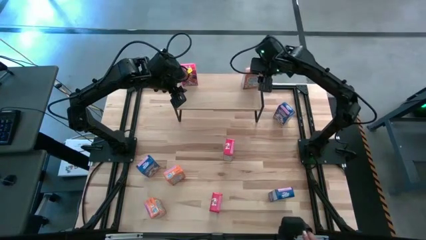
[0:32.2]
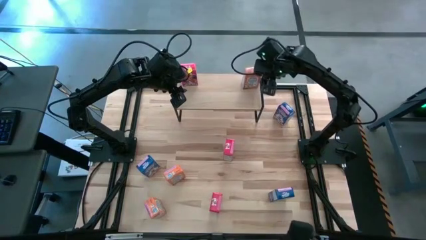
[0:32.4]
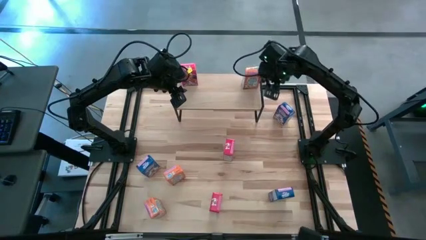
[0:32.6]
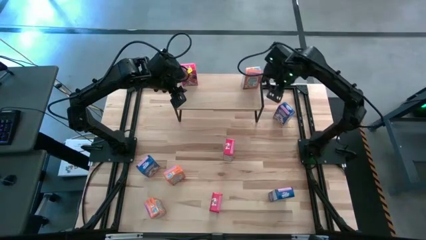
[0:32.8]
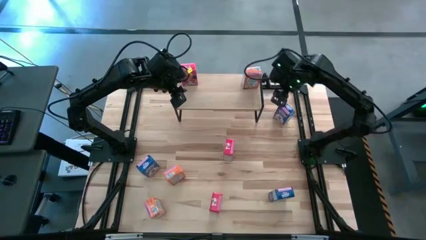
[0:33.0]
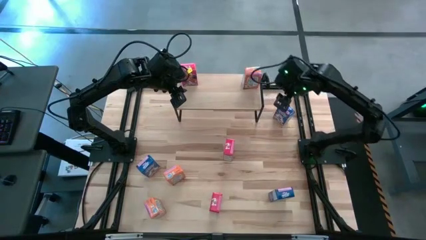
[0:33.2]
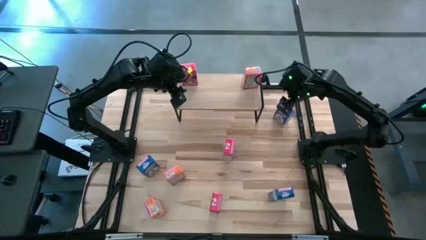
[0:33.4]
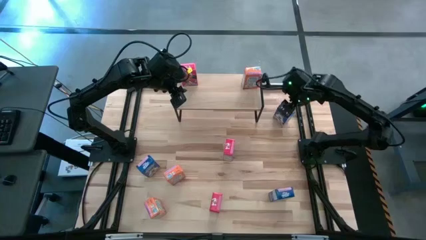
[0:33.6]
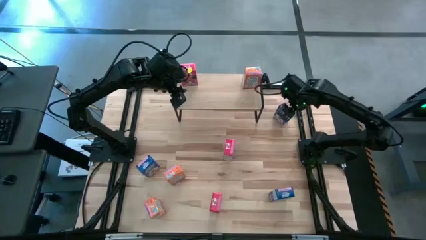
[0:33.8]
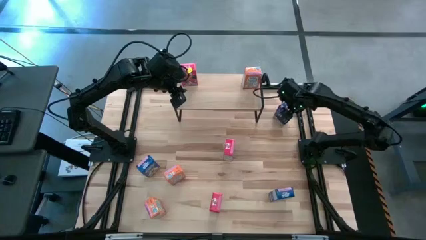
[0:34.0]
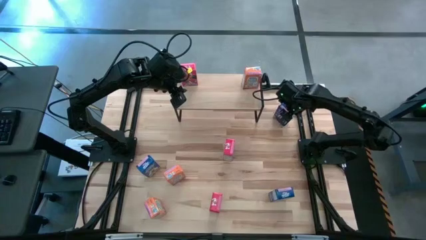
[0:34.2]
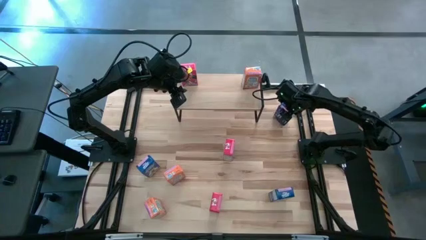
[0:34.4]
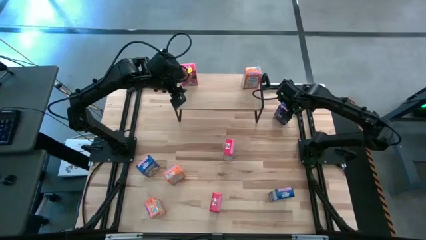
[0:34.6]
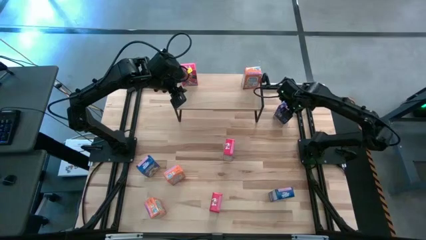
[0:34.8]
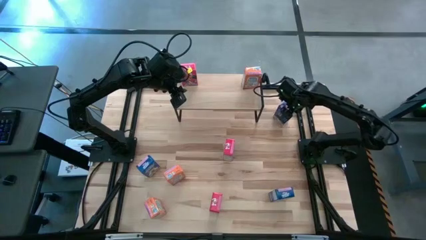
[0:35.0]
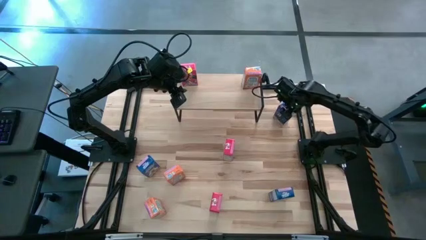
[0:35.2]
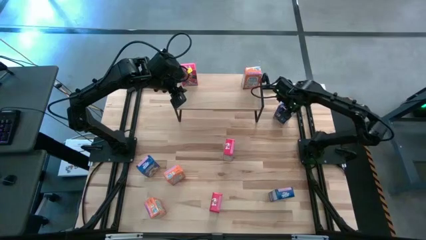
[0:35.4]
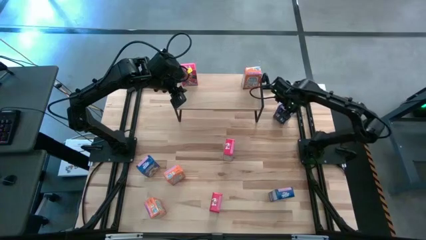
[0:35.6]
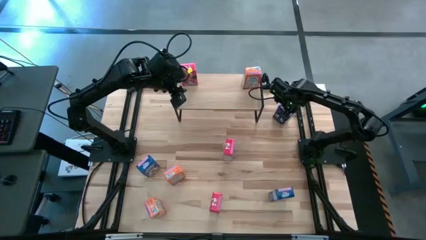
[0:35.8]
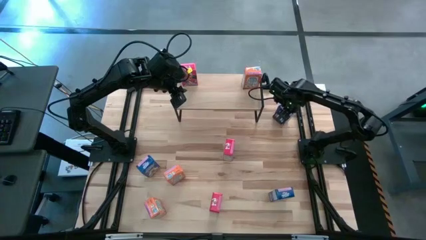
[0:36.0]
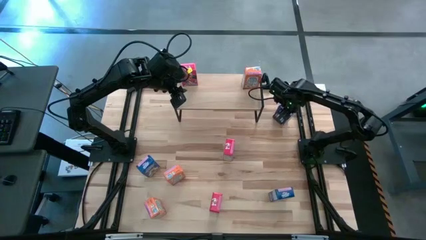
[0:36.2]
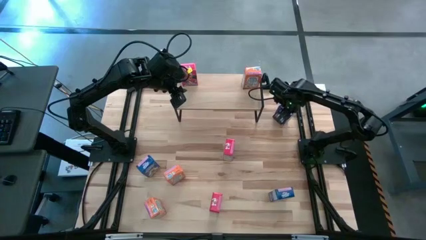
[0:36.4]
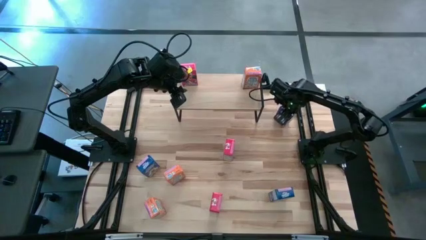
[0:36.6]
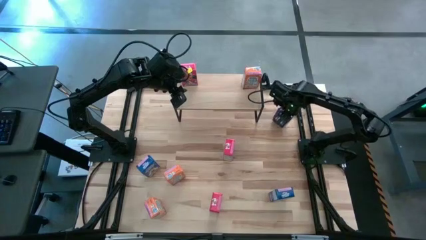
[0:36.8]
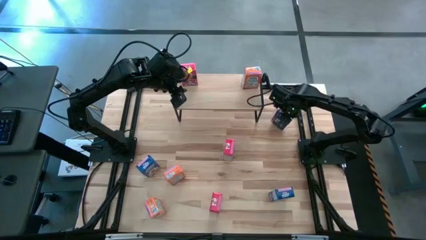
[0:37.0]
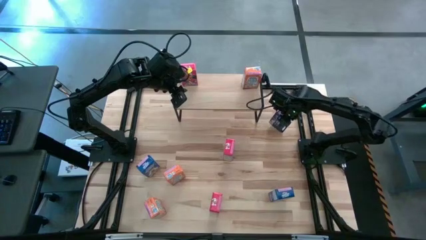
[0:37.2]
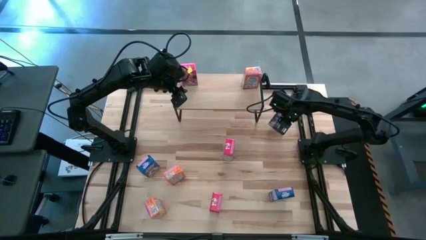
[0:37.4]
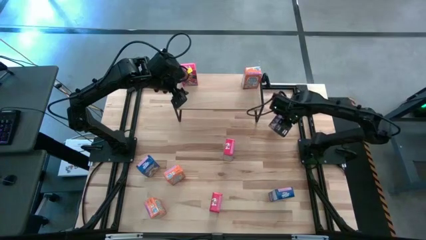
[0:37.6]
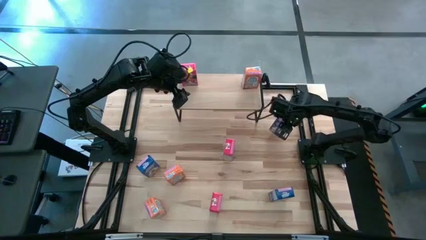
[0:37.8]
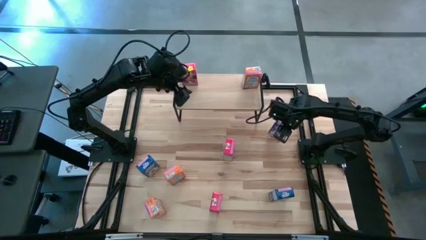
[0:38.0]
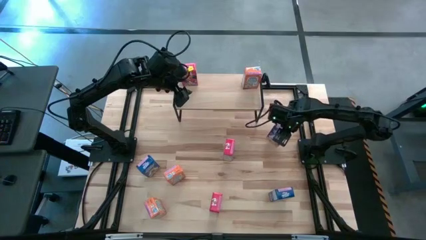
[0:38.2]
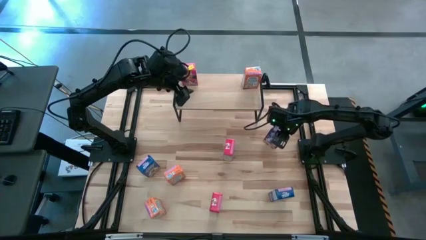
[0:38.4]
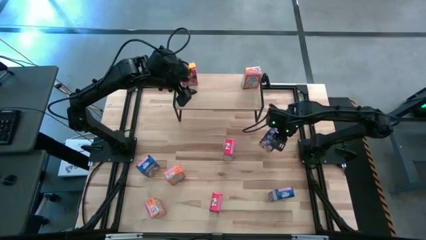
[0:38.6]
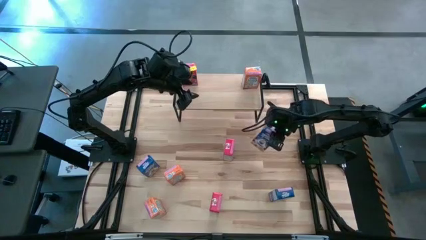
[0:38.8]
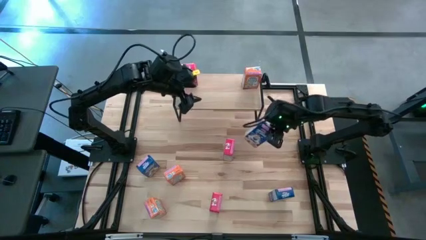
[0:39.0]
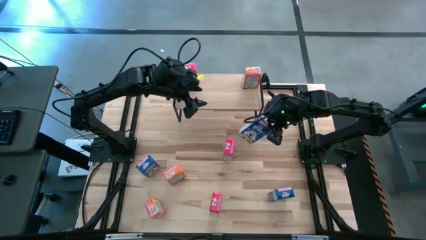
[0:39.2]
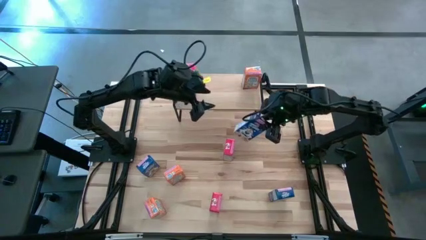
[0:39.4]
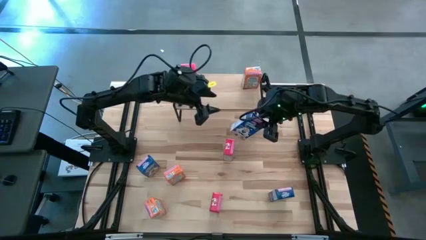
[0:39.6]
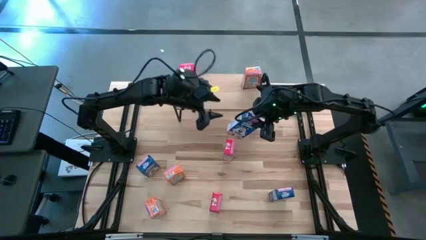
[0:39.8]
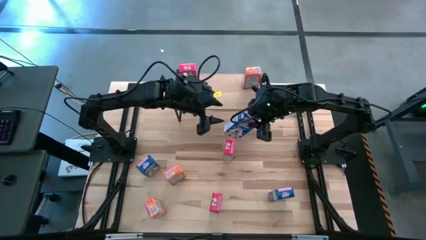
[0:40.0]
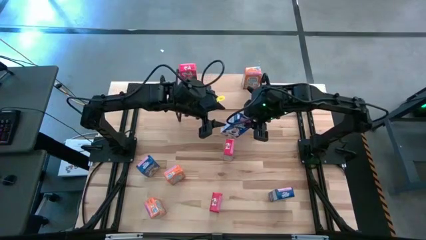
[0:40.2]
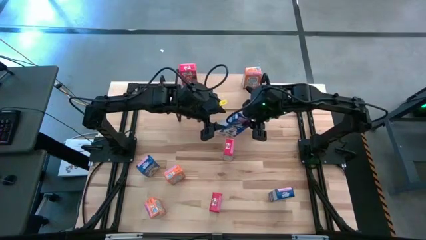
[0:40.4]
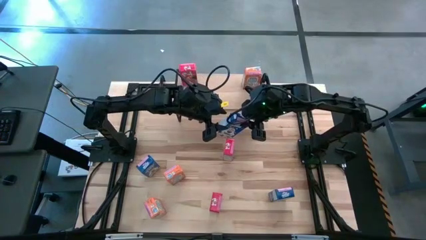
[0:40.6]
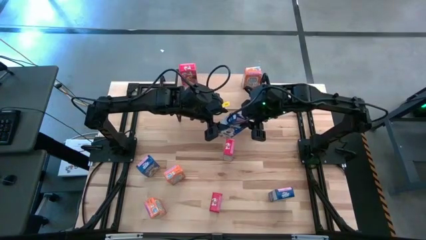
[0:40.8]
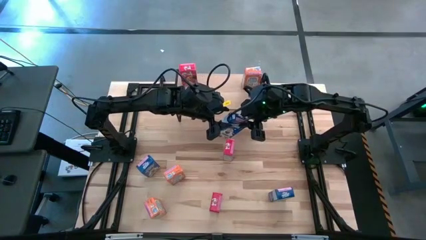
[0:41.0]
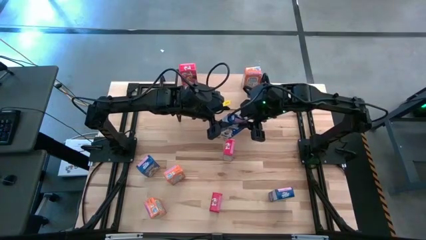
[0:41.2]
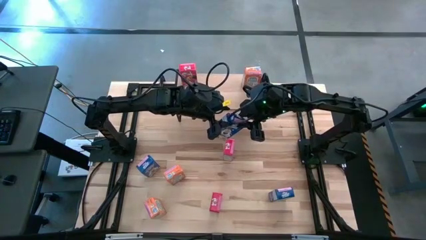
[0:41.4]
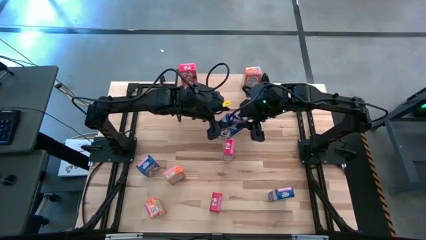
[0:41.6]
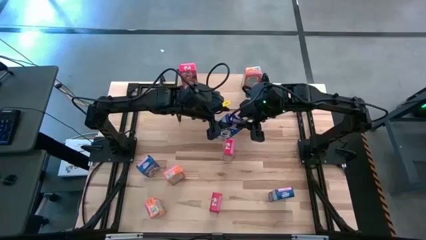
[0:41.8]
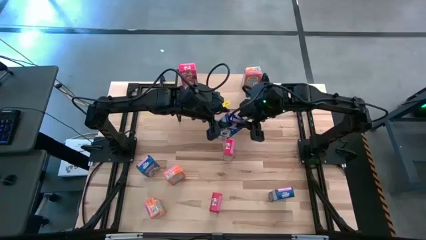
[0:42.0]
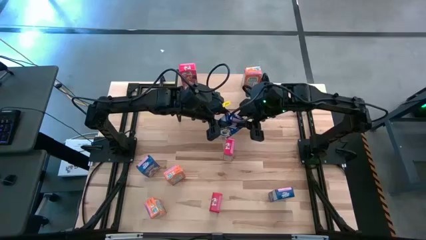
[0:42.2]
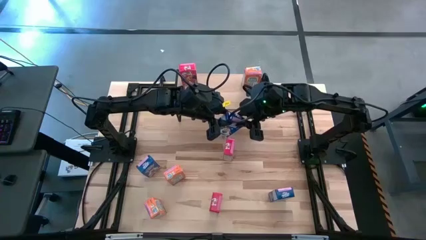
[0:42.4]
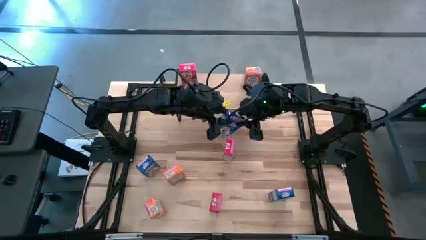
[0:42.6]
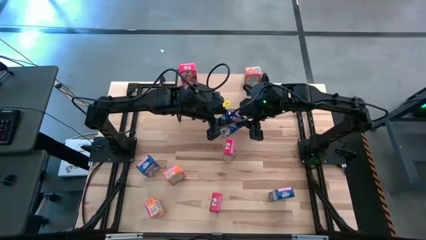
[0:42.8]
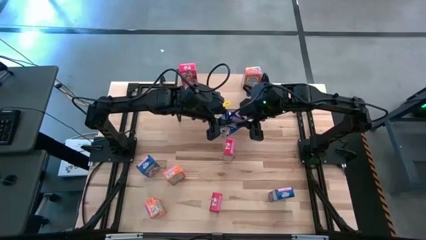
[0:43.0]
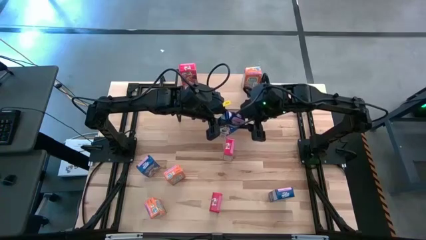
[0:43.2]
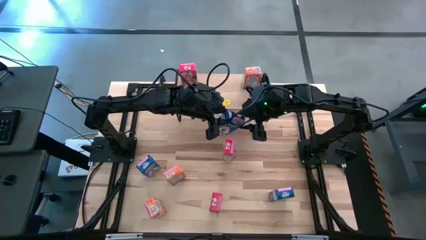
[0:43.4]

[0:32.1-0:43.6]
Task: Stack cereal on shelf
Put the top blue cereal box on the shelf
